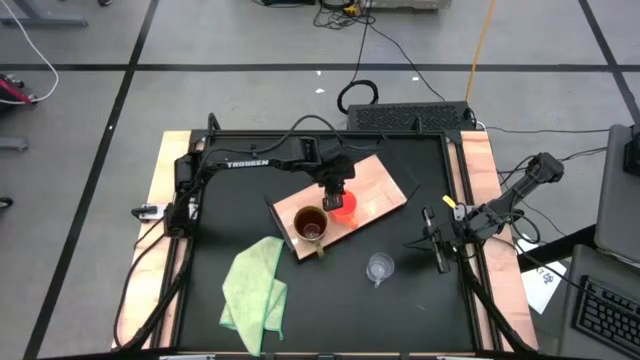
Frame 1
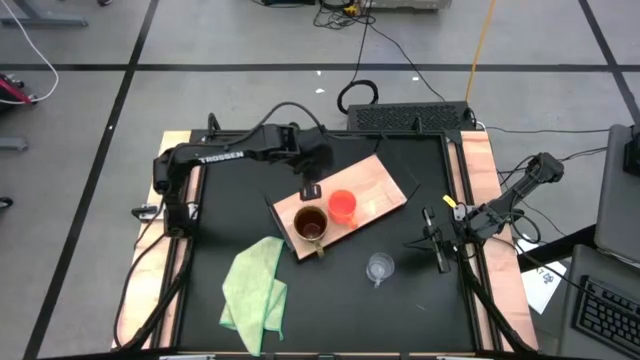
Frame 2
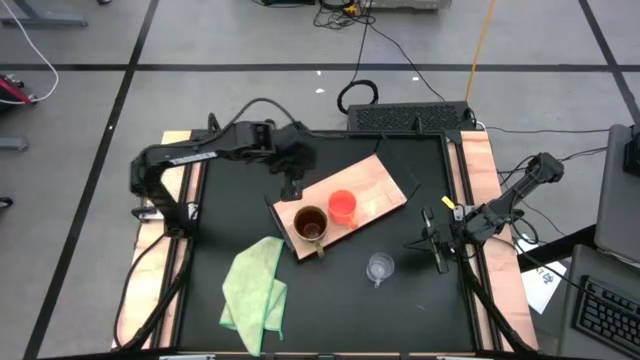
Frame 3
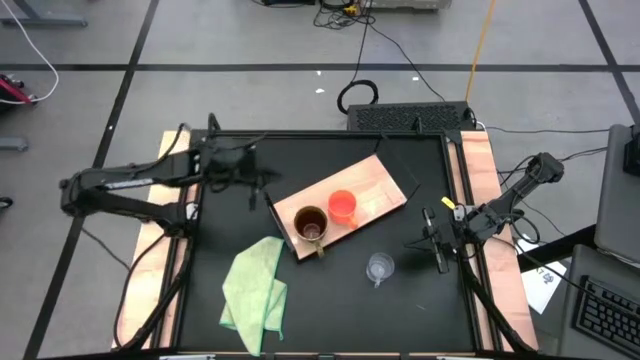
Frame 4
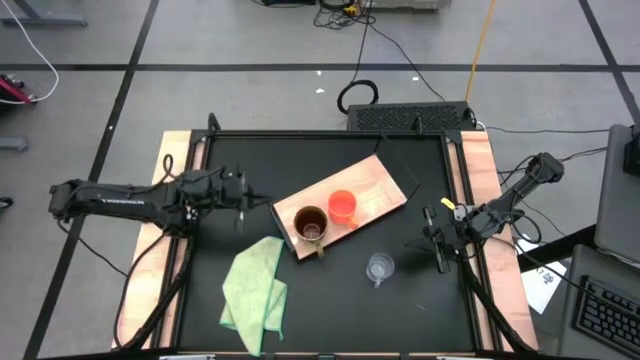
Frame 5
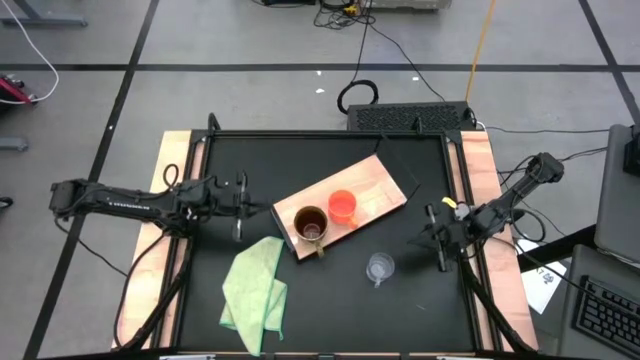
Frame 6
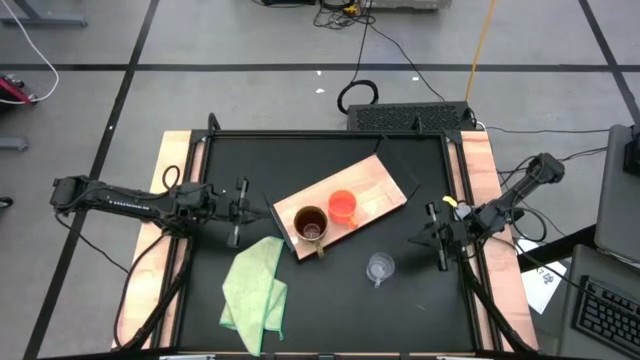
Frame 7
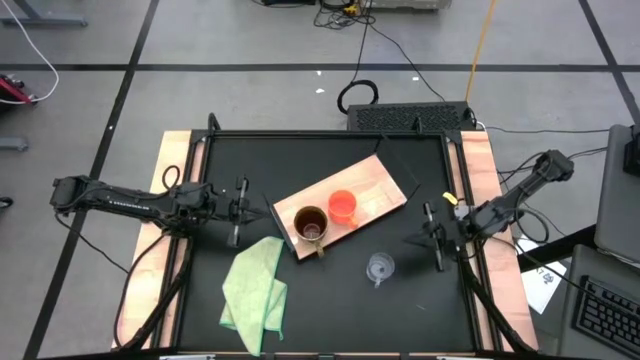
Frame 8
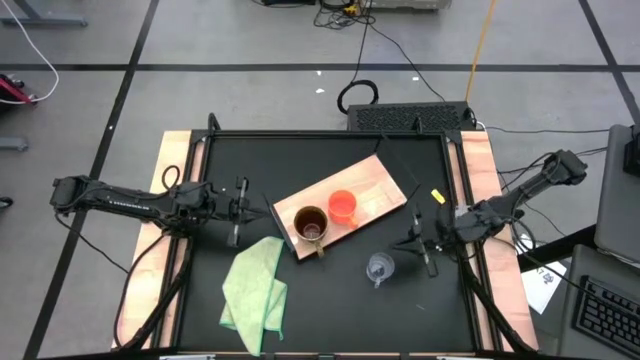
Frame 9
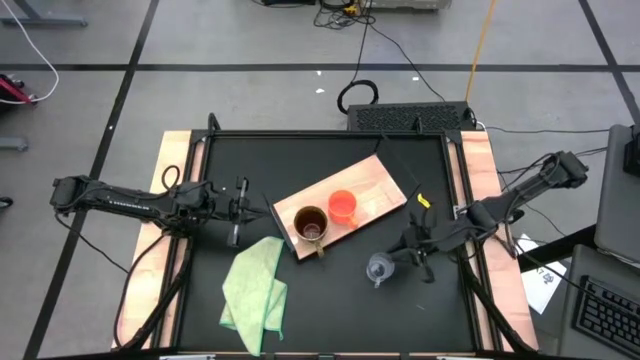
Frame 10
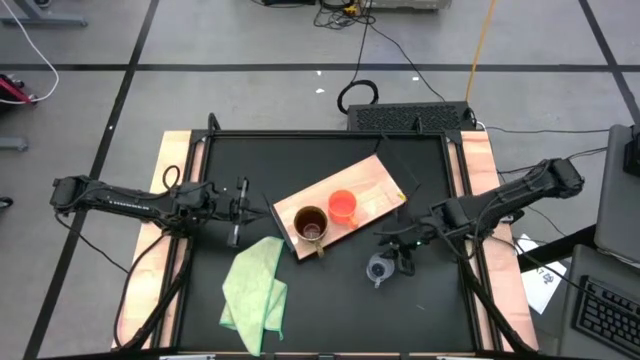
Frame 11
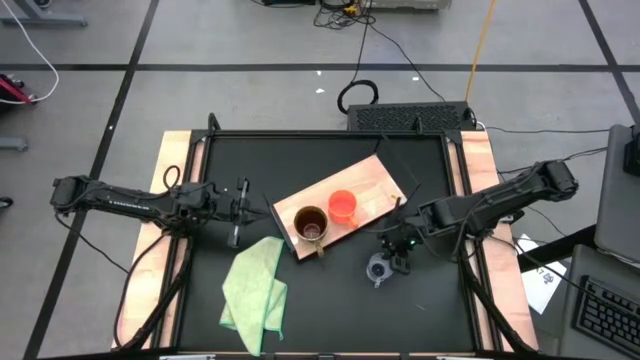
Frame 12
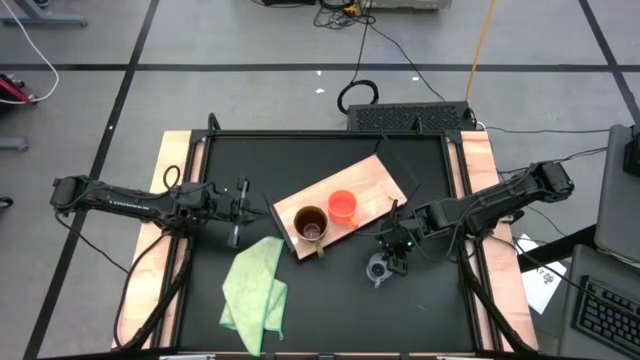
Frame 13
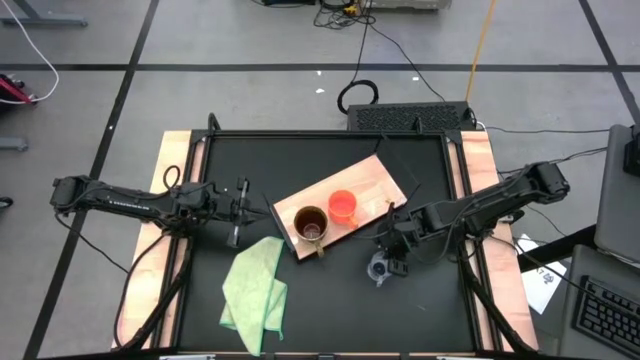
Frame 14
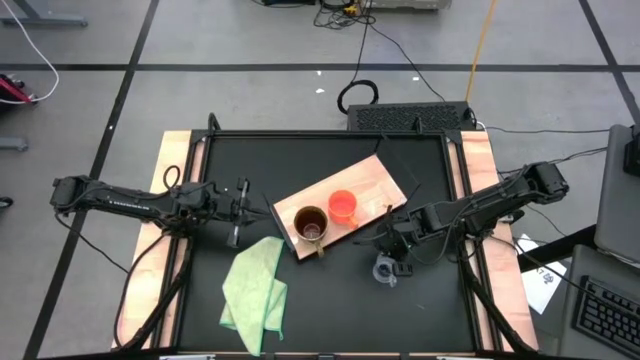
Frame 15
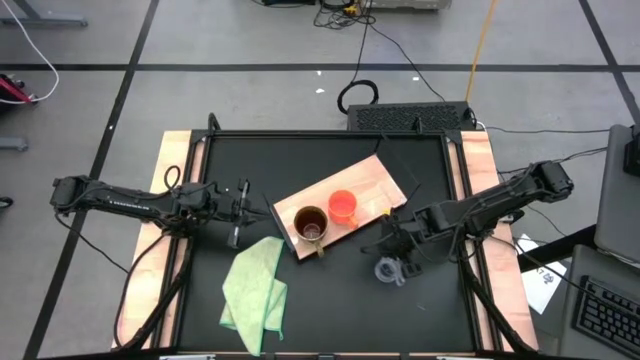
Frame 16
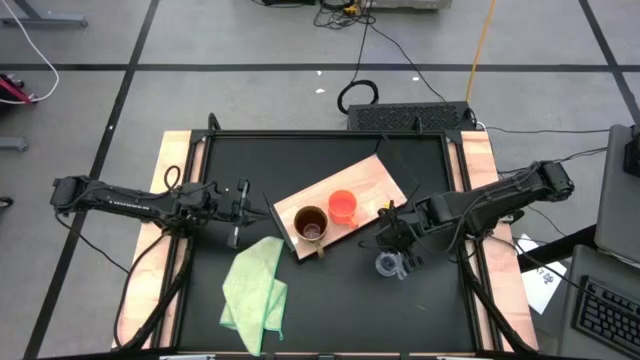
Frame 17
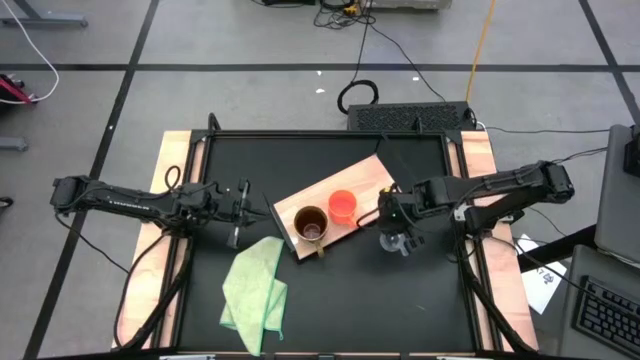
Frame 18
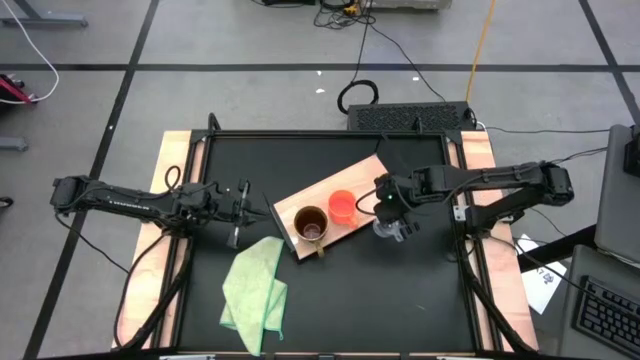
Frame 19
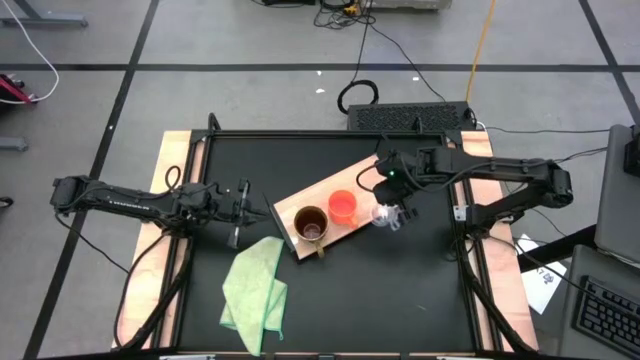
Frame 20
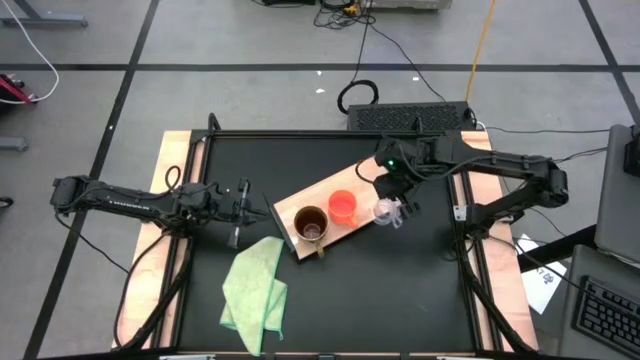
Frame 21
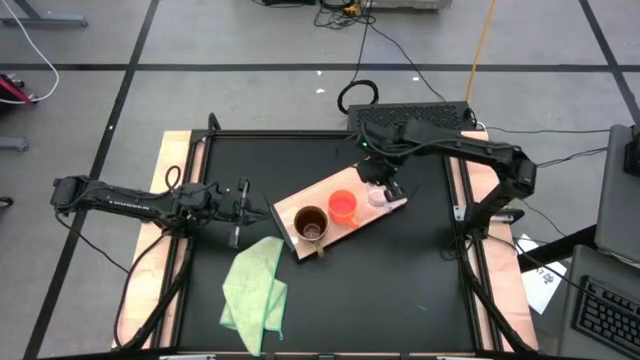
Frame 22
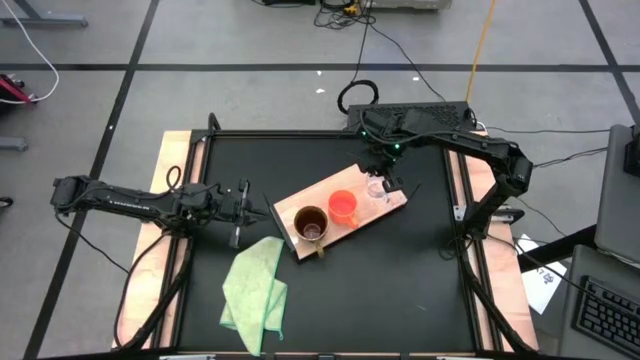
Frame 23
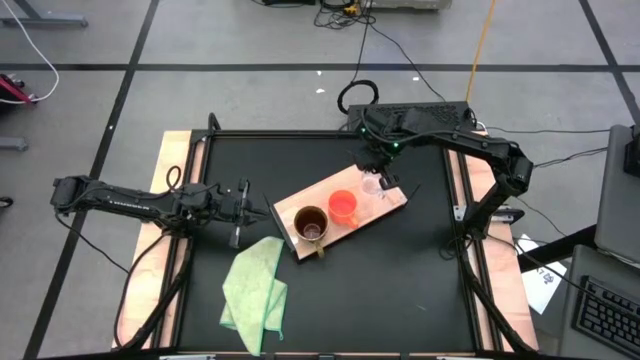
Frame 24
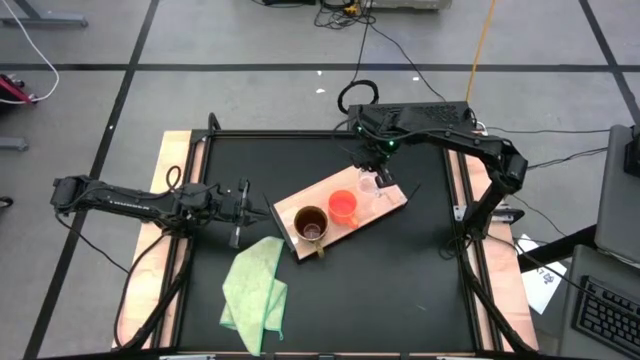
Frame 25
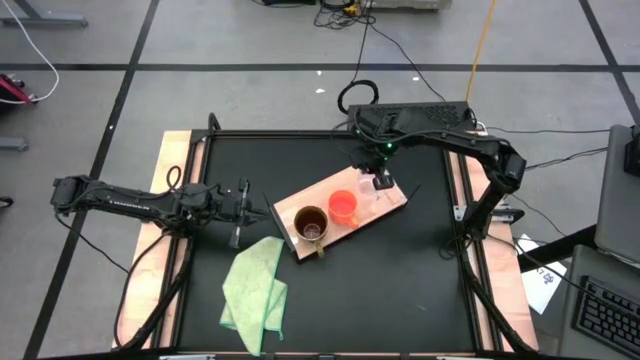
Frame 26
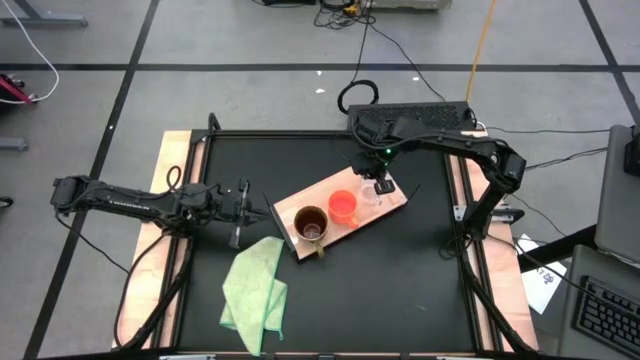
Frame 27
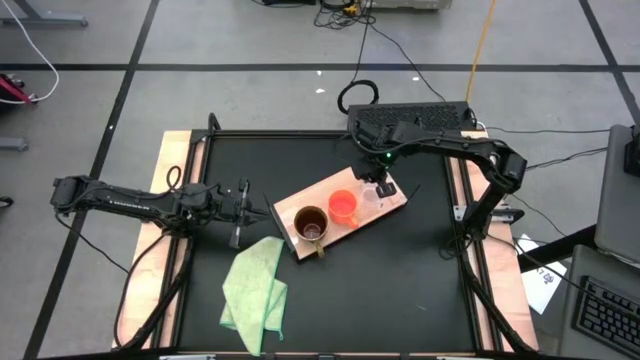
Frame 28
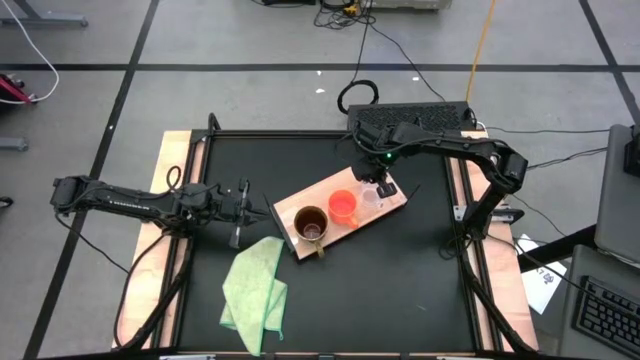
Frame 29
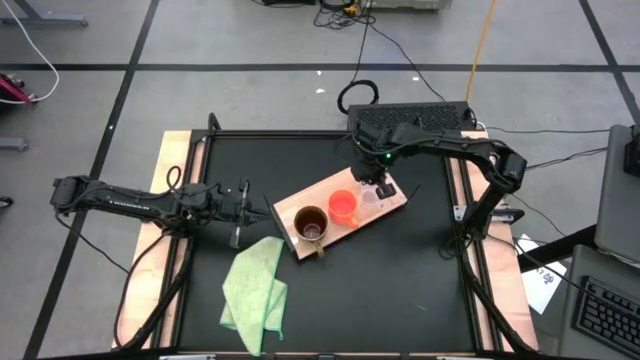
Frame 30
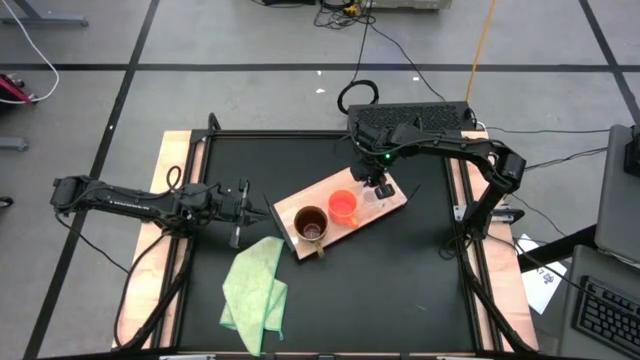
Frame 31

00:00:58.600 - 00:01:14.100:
Task: Stack small to large cups/mugs on shelf
Put the transparent mug on the shelf

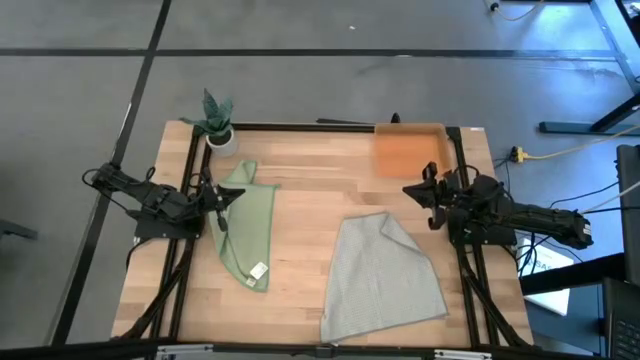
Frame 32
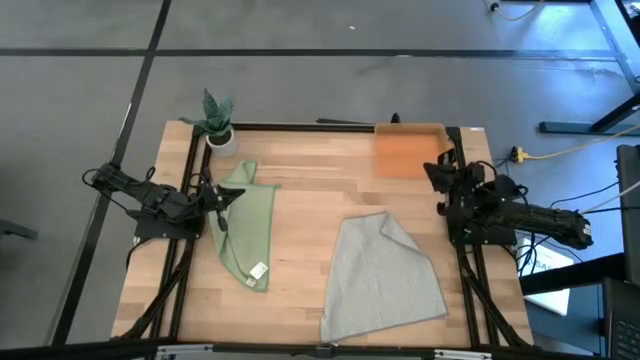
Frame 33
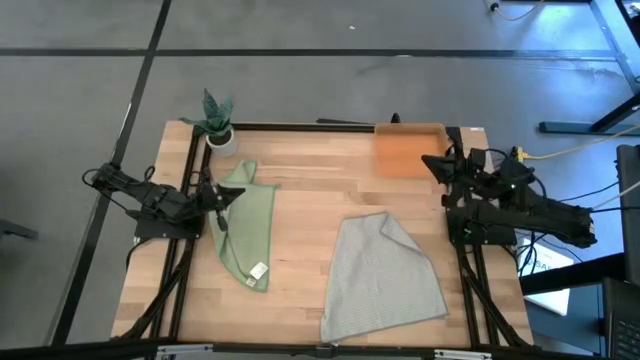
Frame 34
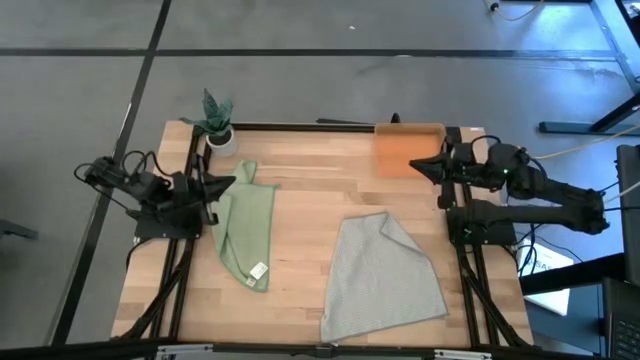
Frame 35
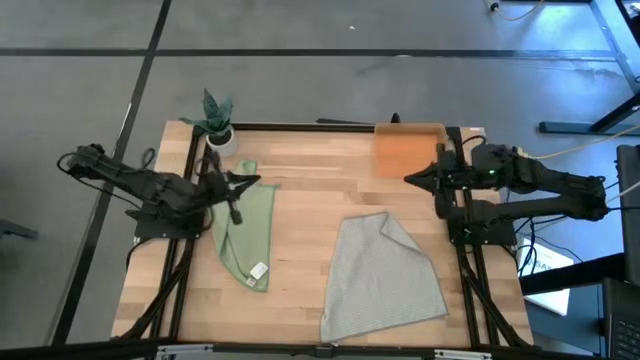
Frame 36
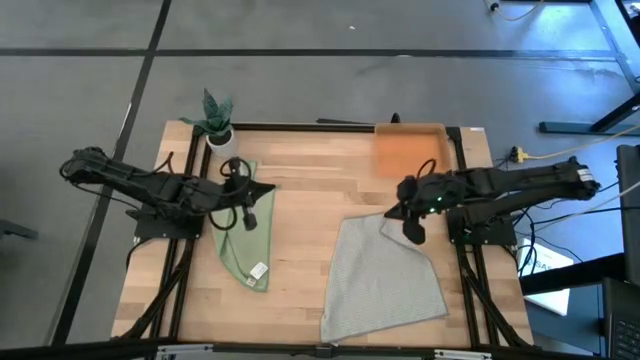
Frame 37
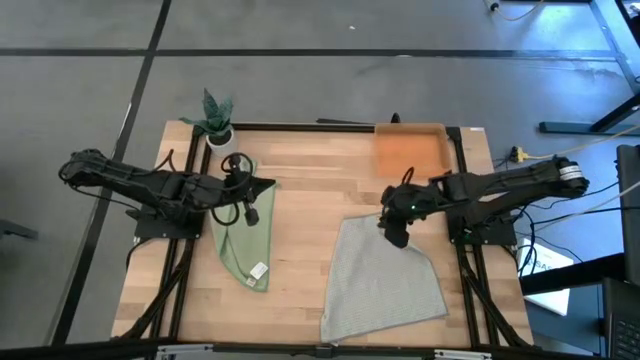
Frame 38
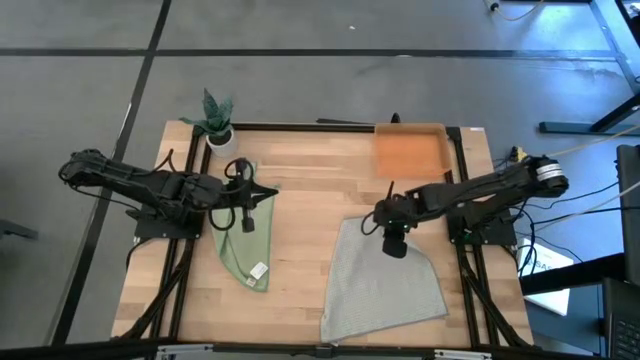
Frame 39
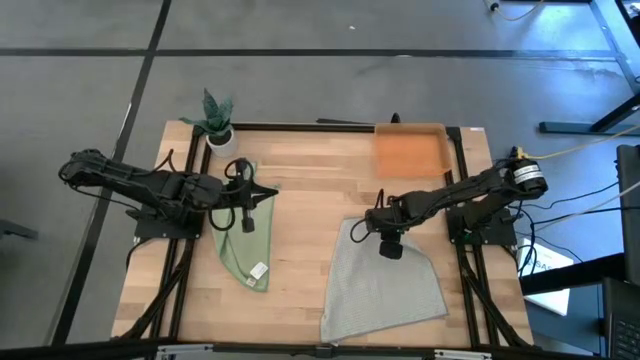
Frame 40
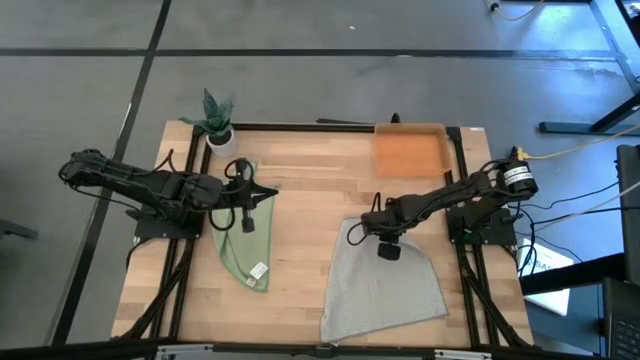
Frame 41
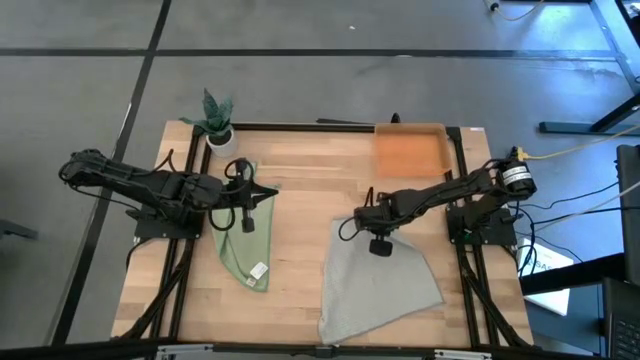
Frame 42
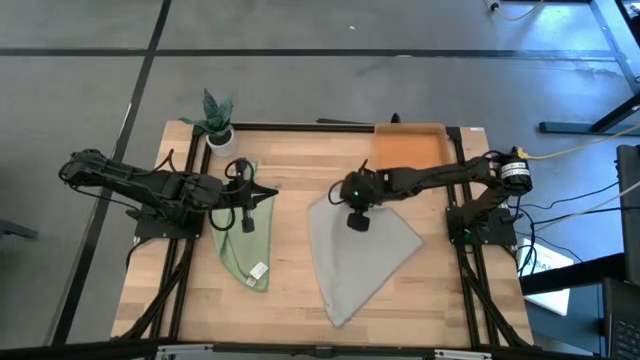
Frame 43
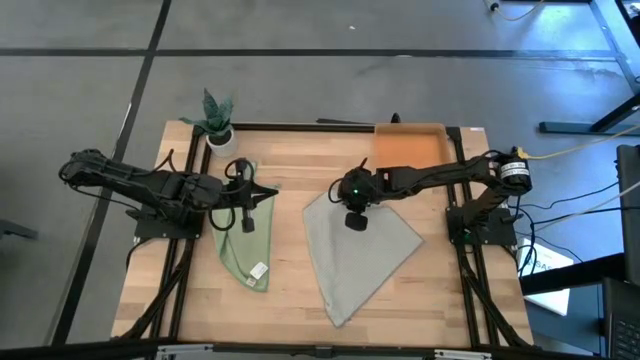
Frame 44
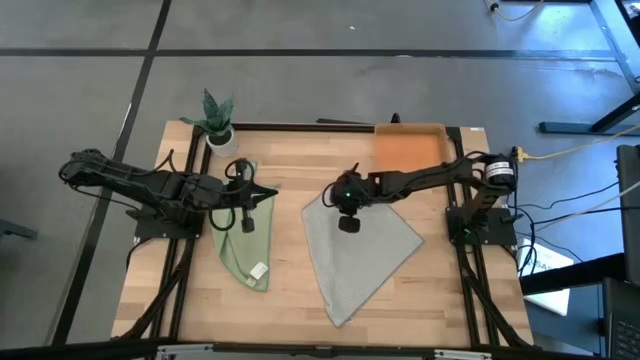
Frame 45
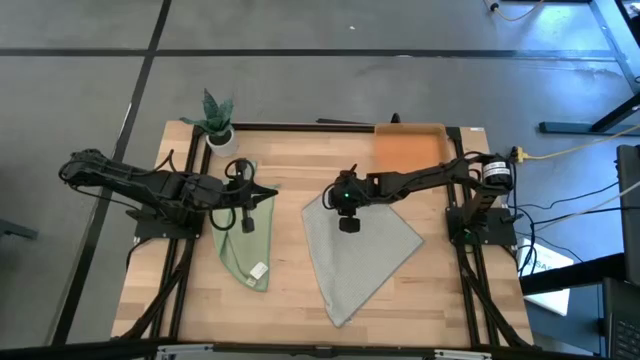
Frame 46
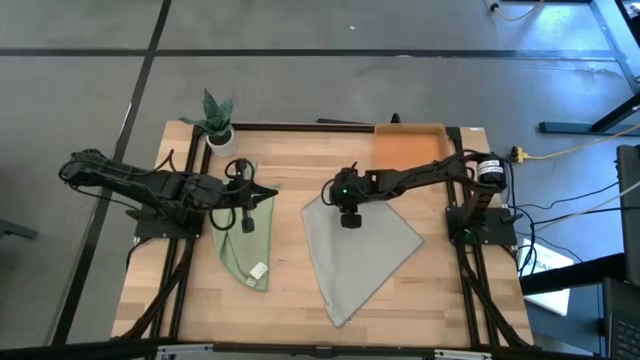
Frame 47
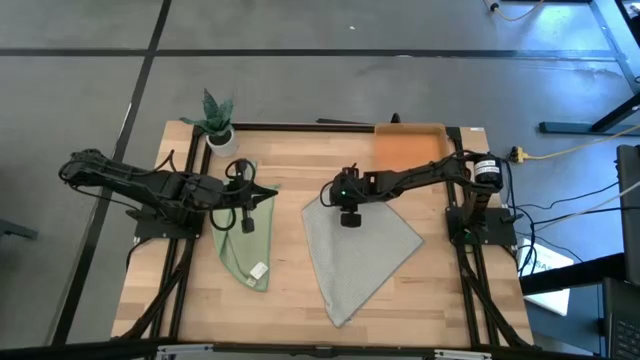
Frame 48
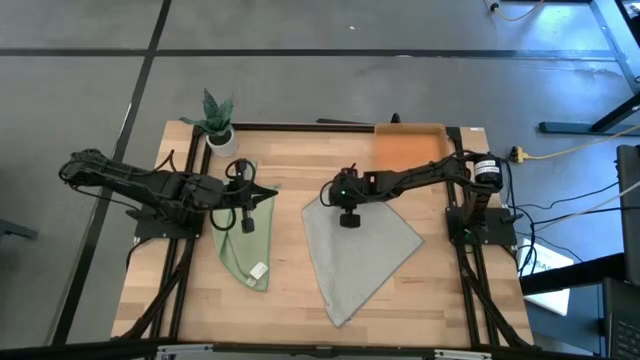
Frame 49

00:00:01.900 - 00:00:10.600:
Task: Roll microfiber towels into tight, uniform cylinder then place into a basket
Fold the gray microfiber towel
